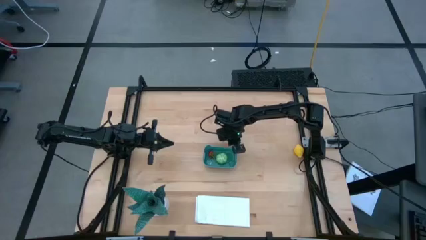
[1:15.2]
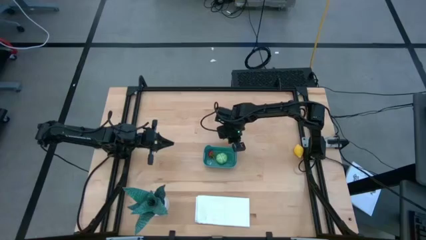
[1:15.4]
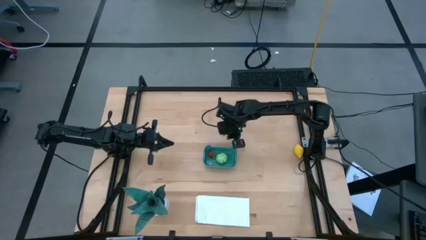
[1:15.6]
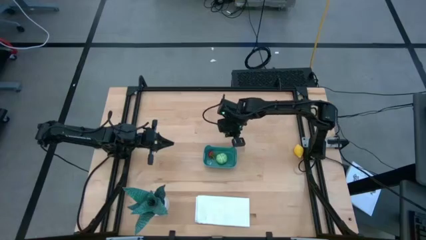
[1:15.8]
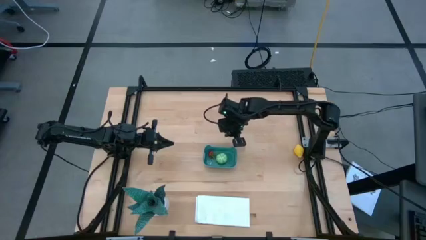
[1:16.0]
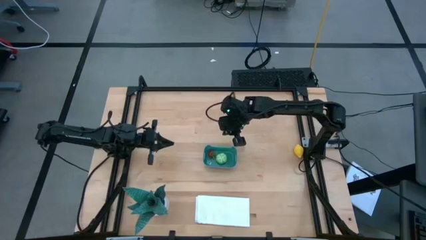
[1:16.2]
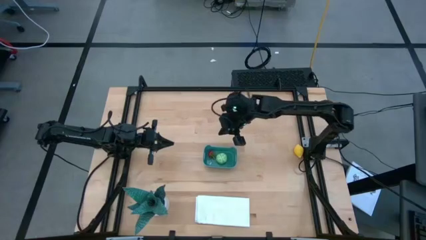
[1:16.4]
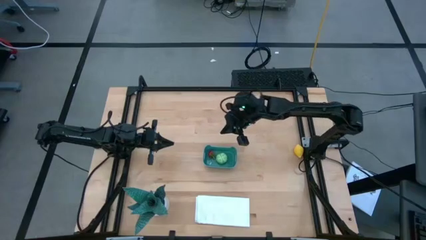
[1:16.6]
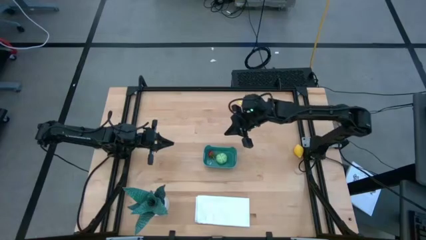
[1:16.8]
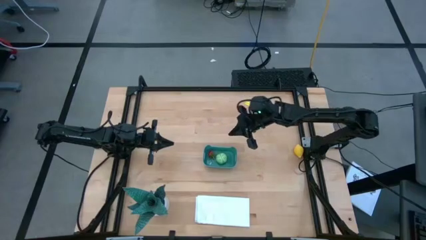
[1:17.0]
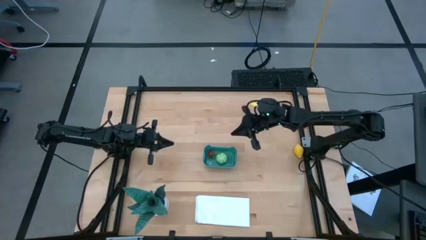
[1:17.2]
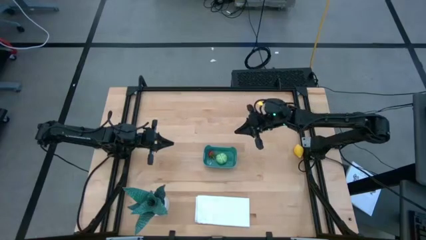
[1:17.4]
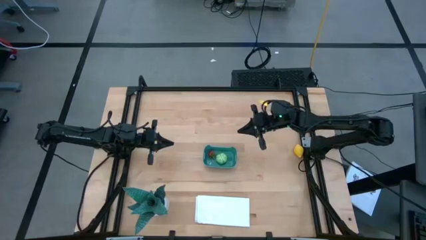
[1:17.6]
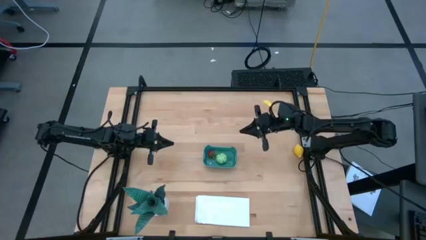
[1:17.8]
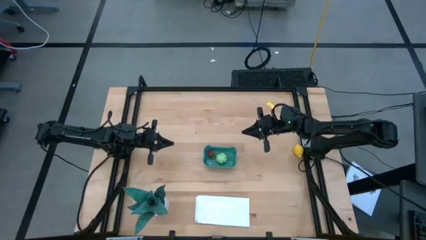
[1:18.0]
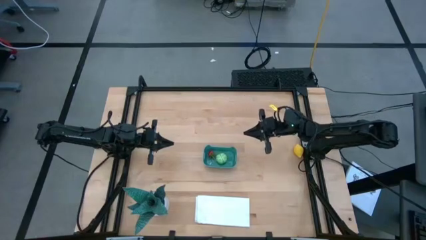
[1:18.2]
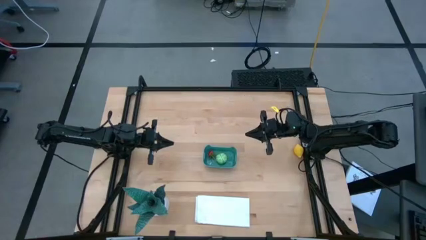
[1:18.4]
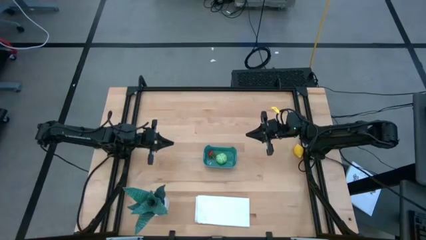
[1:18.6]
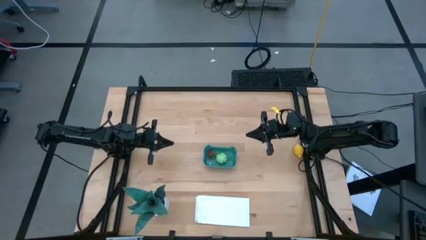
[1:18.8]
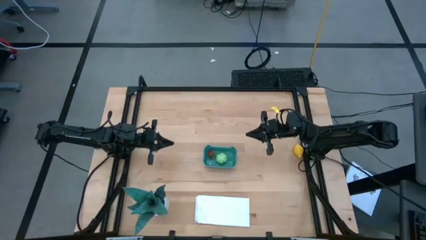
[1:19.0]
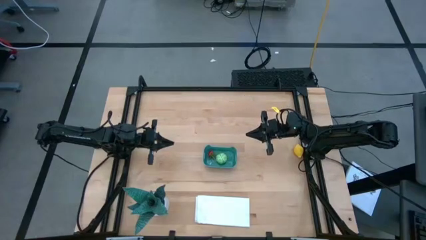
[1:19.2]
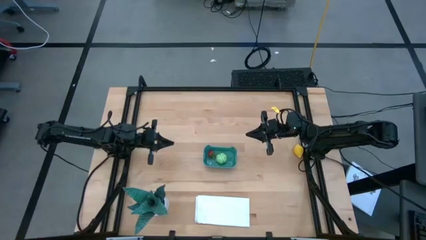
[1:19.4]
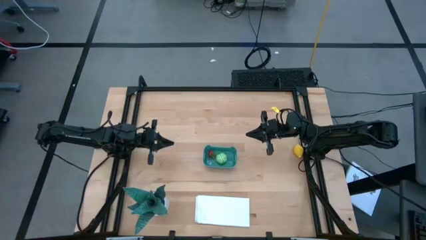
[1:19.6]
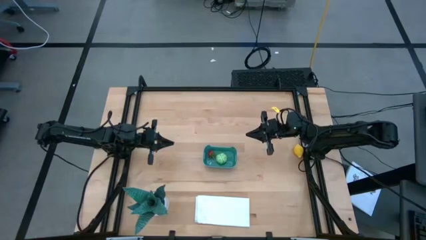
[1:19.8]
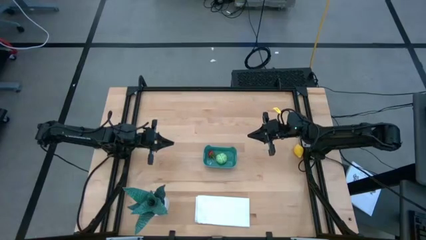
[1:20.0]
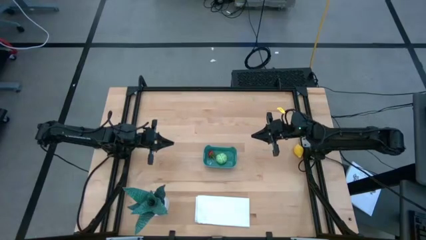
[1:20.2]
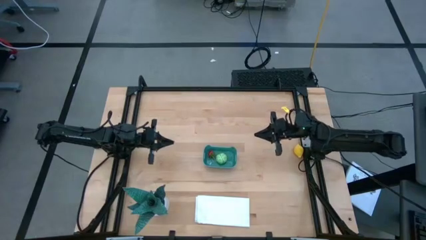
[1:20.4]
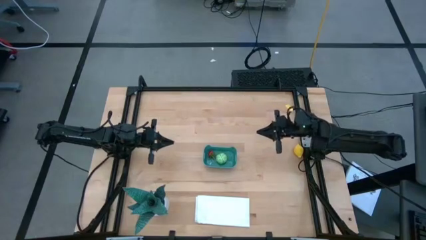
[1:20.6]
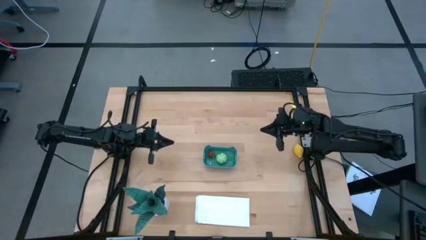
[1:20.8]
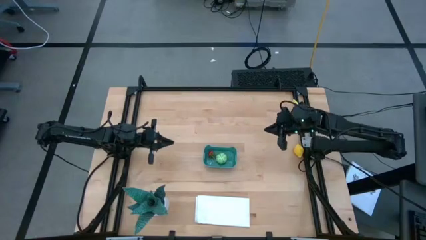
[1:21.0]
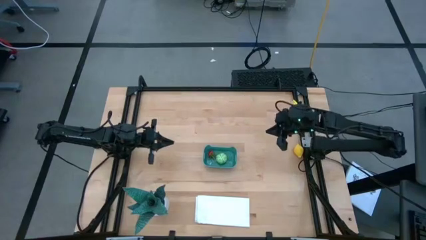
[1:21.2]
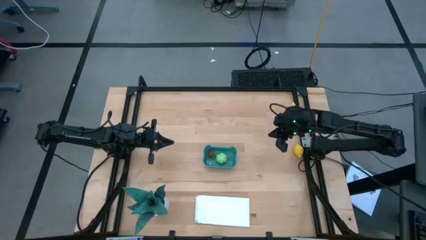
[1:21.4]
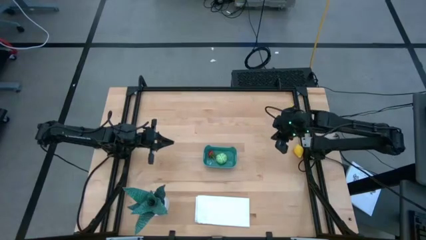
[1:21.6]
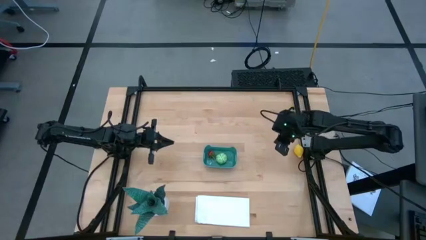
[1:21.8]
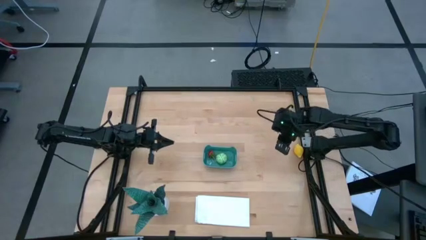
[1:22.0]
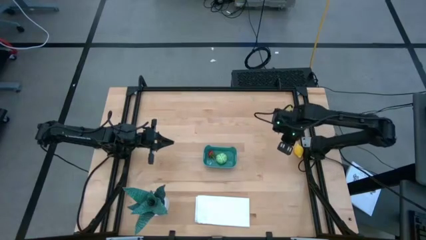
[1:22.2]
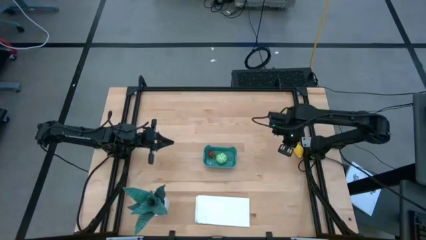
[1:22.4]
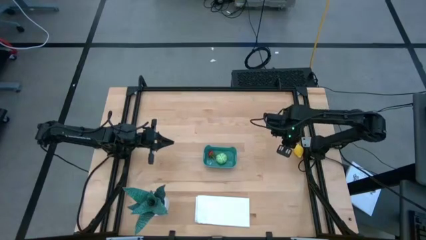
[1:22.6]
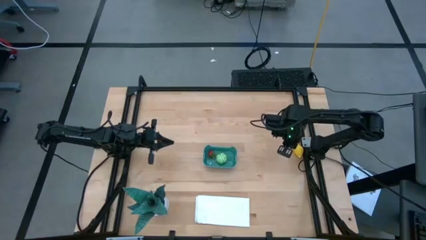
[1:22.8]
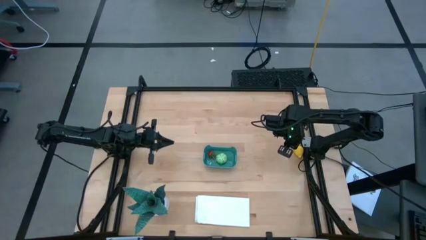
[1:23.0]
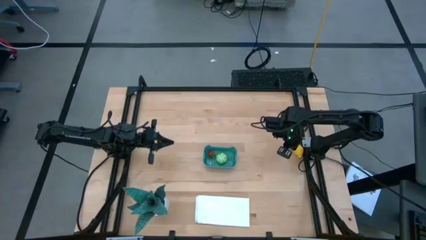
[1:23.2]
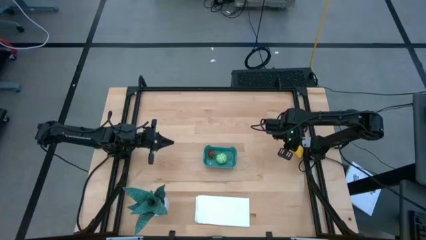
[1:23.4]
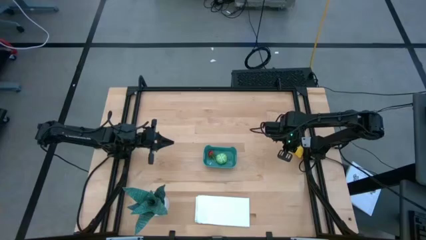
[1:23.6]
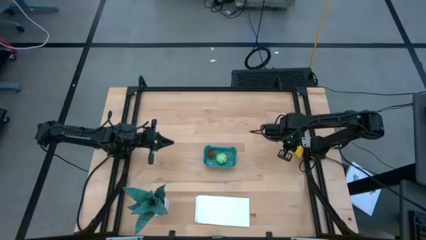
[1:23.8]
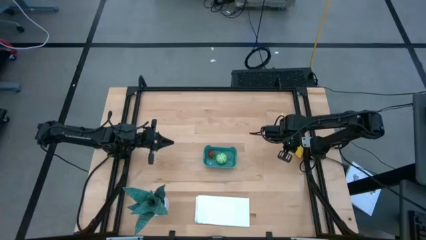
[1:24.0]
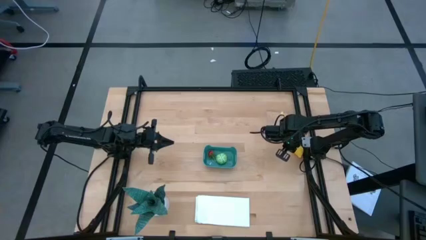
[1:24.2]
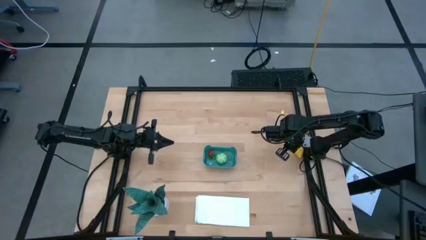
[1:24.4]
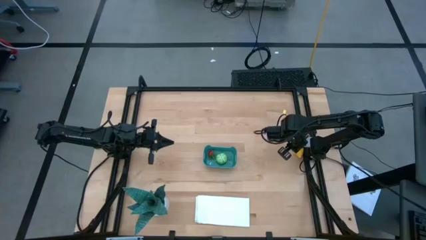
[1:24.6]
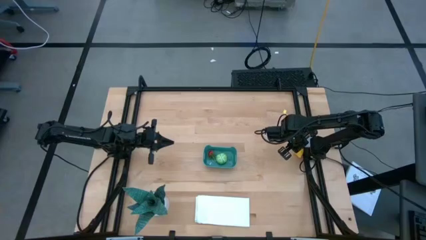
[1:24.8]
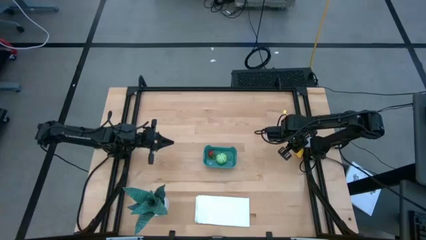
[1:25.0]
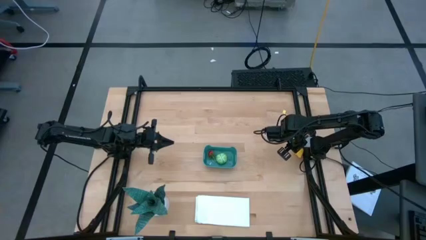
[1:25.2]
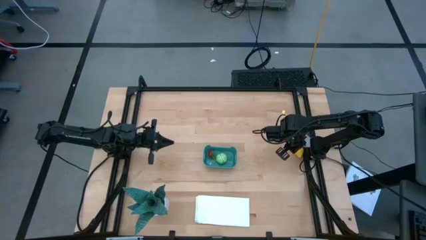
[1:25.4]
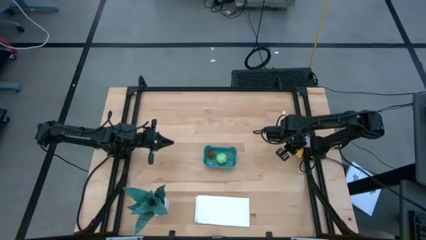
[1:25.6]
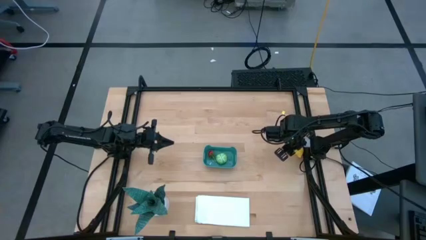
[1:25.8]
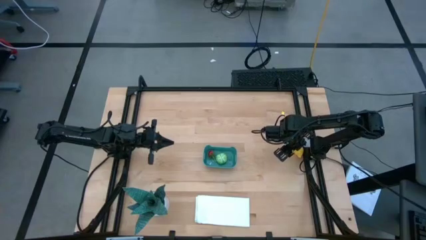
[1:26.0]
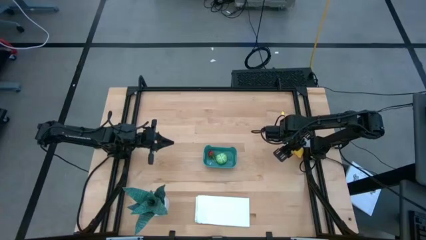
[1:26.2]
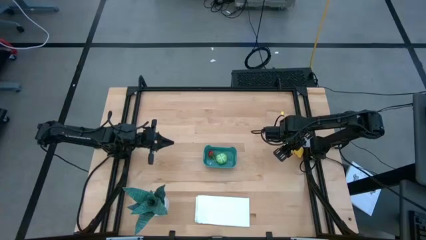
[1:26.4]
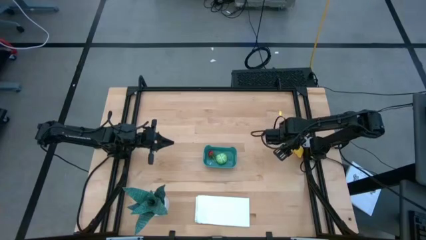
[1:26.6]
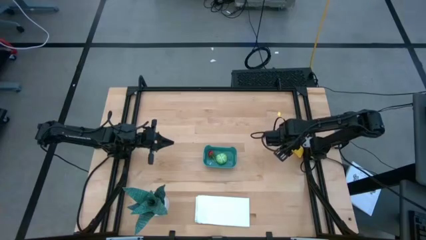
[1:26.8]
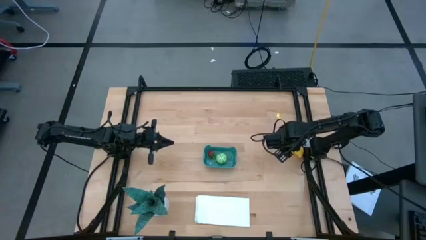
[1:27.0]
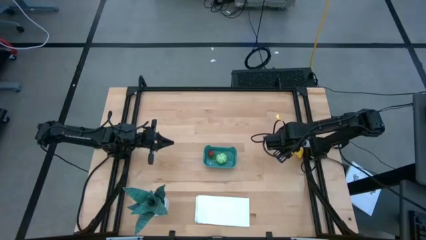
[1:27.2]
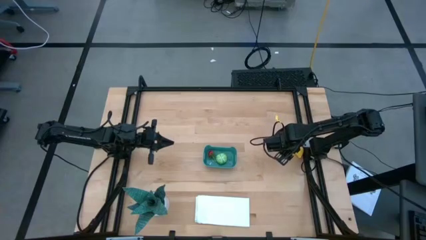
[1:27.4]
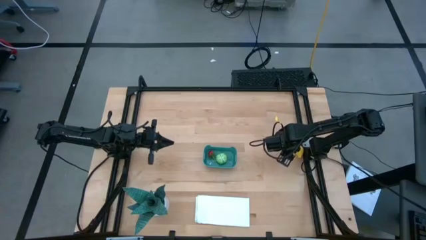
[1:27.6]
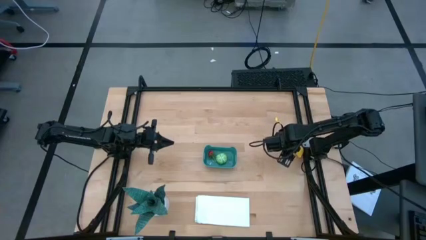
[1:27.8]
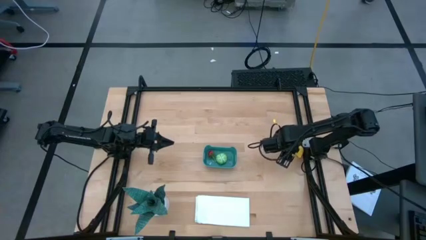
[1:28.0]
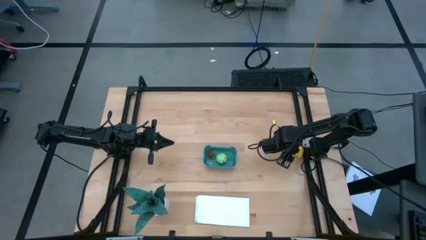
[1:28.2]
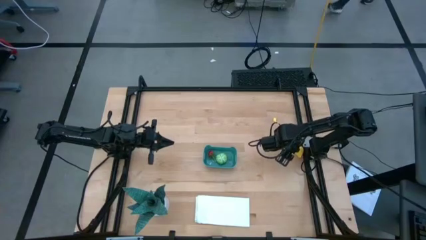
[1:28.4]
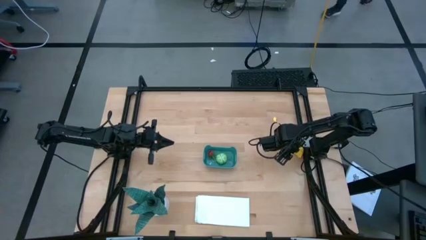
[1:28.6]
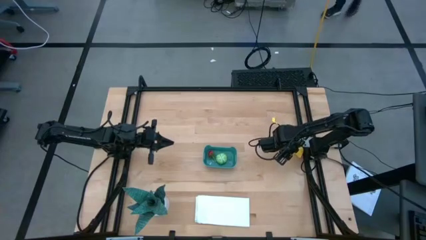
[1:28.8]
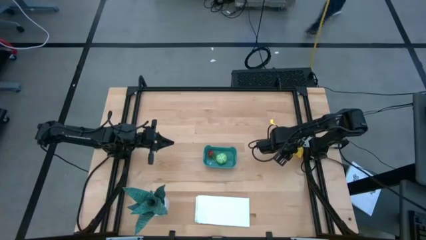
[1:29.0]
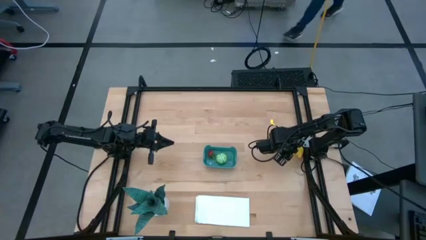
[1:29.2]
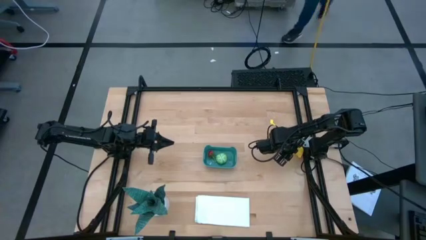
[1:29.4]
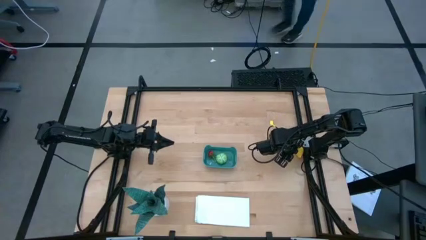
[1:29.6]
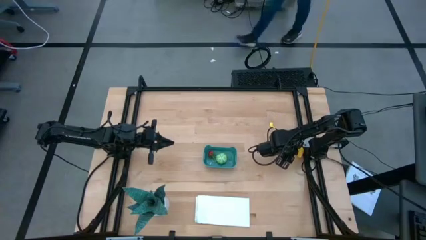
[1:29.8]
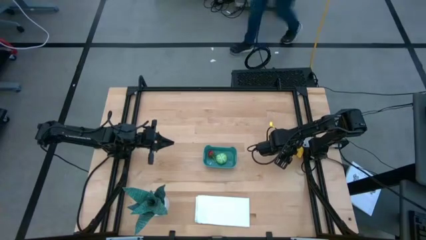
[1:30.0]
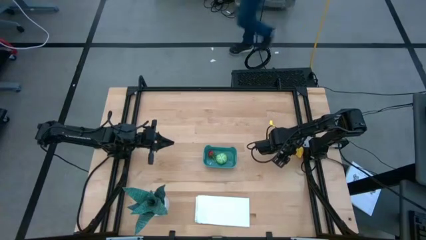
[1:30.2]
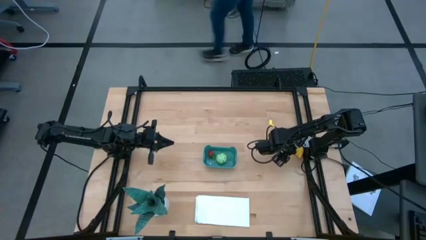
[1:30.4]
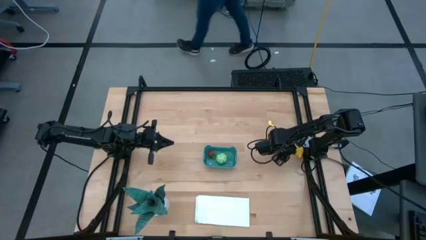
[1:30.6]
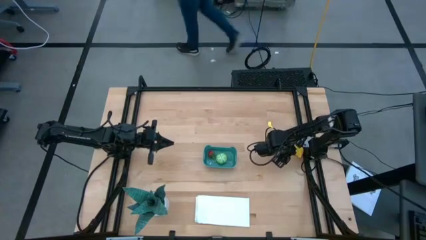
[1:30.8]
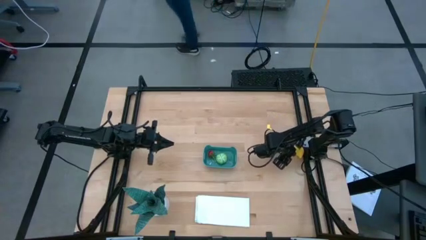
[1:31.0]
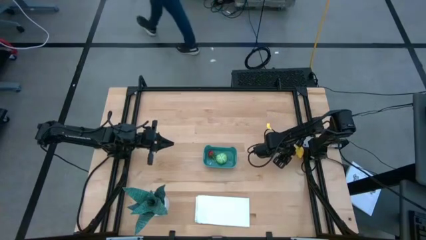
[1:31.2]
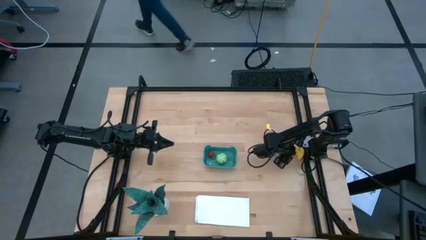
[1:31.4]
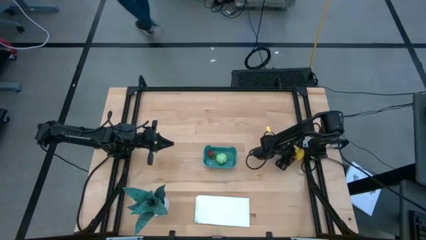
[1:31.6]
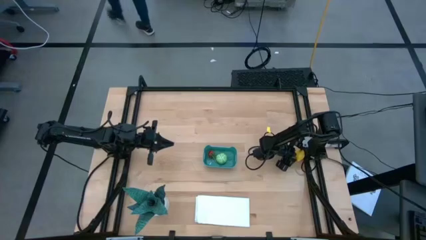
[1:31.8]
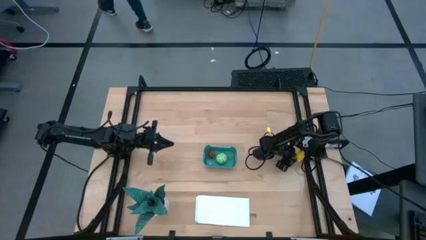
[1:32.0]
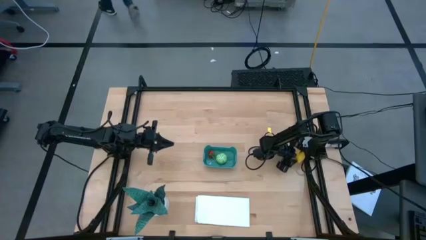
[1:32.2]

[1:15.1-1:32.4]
Task: Pick and placing Produce into tupperware
Put the yellow lemon into the blue bin
